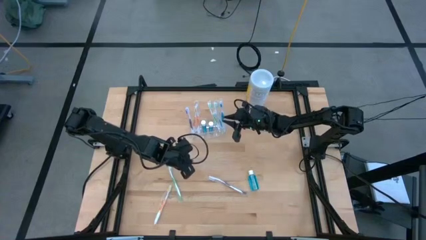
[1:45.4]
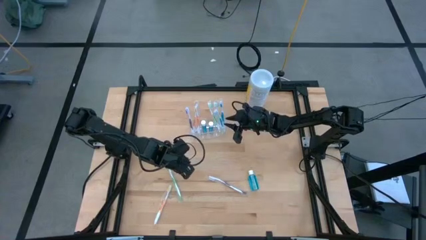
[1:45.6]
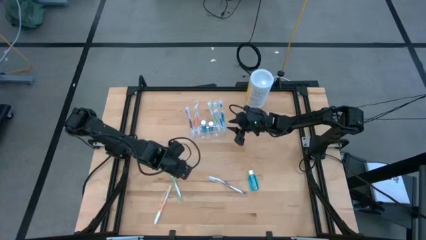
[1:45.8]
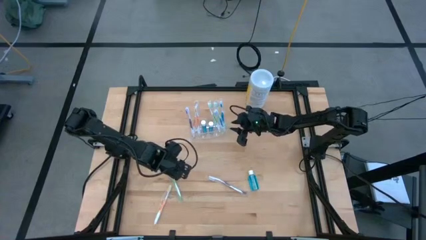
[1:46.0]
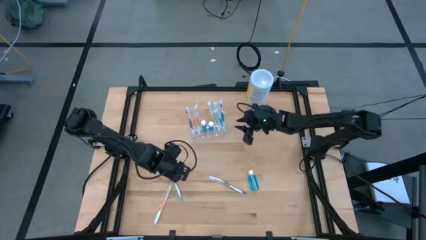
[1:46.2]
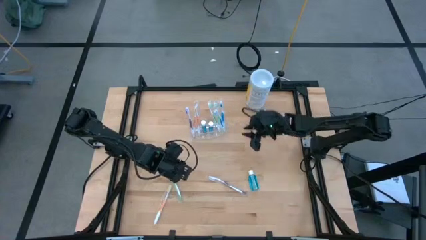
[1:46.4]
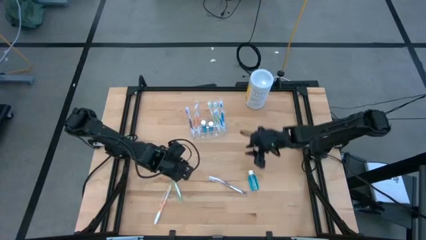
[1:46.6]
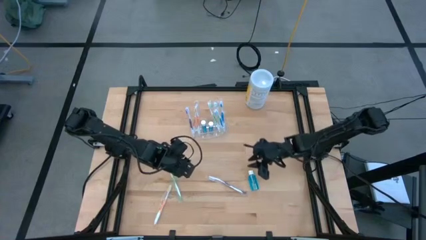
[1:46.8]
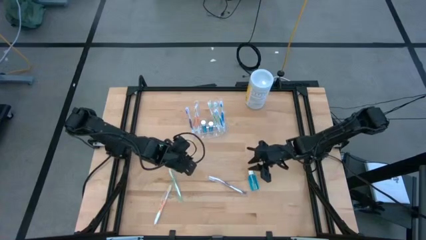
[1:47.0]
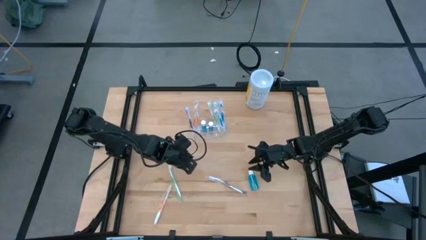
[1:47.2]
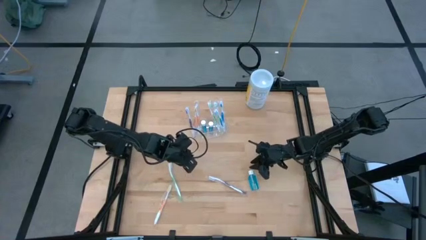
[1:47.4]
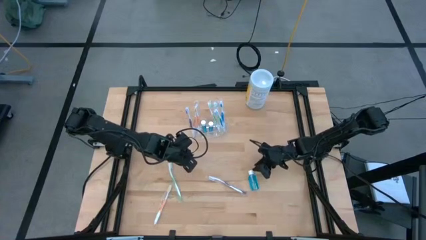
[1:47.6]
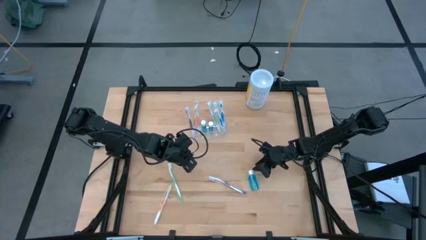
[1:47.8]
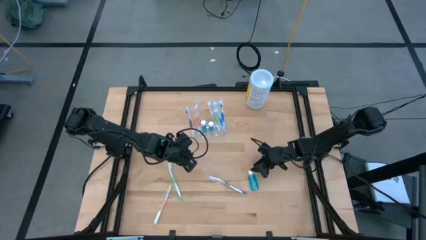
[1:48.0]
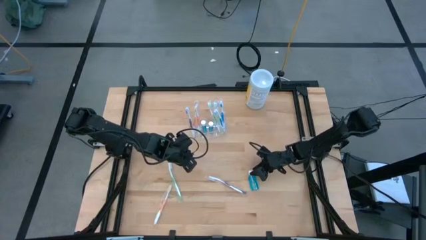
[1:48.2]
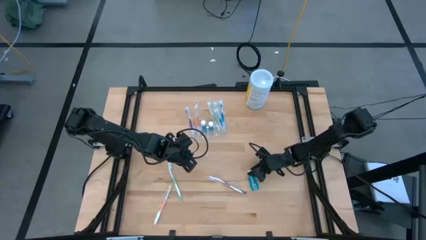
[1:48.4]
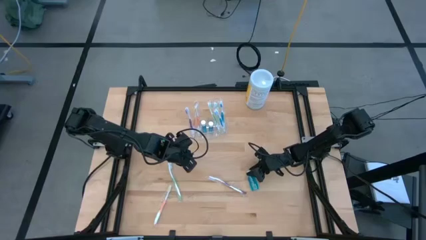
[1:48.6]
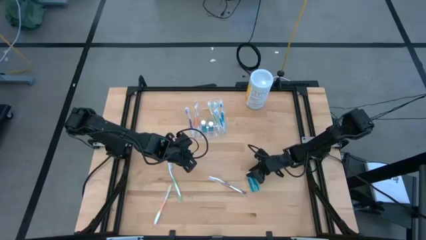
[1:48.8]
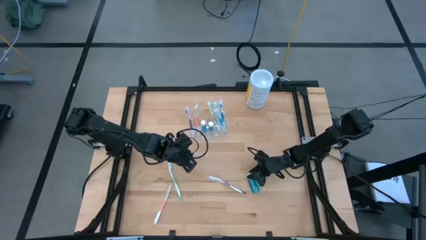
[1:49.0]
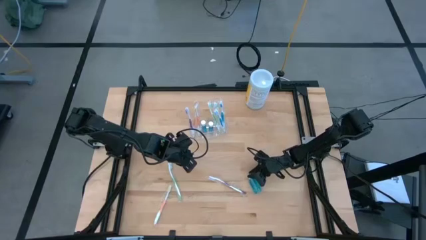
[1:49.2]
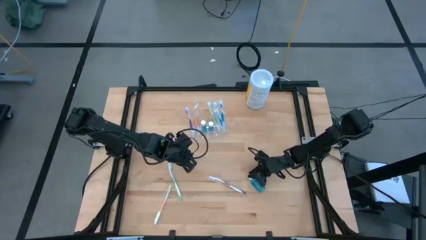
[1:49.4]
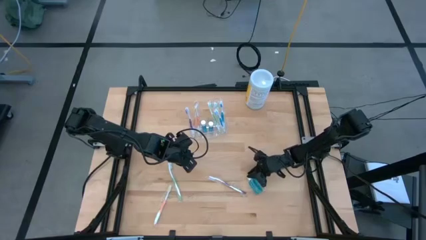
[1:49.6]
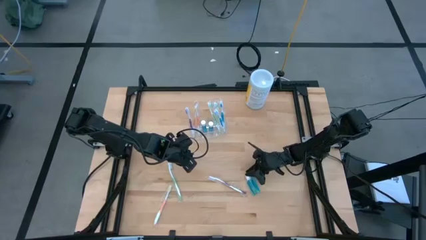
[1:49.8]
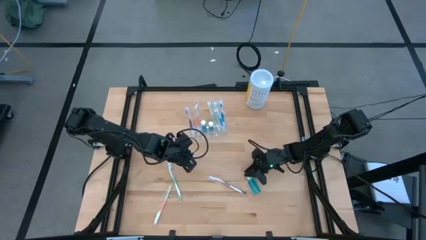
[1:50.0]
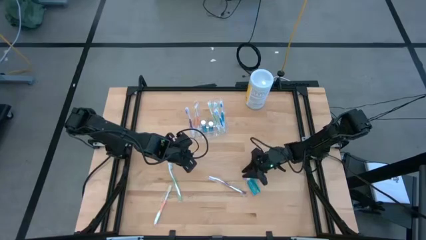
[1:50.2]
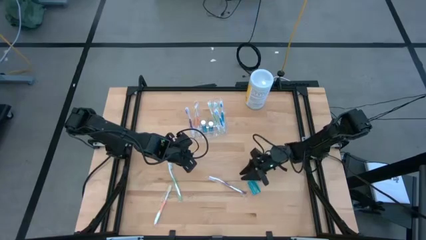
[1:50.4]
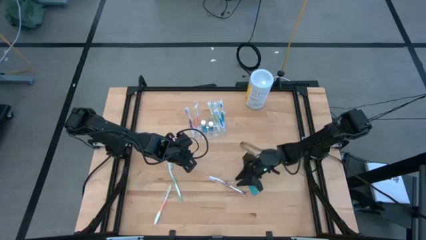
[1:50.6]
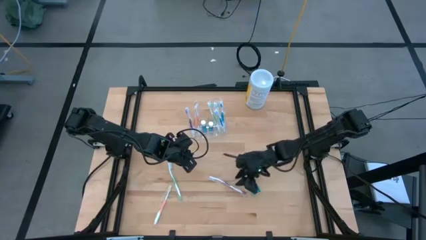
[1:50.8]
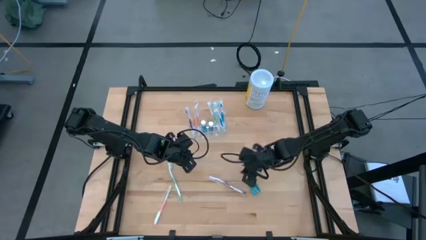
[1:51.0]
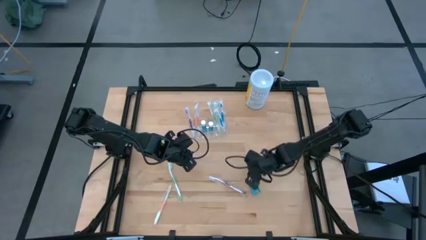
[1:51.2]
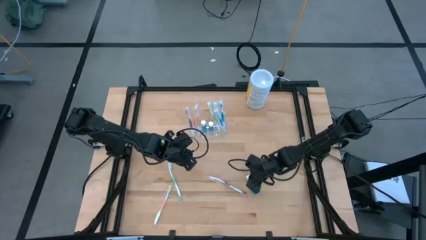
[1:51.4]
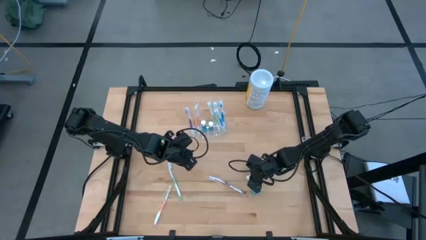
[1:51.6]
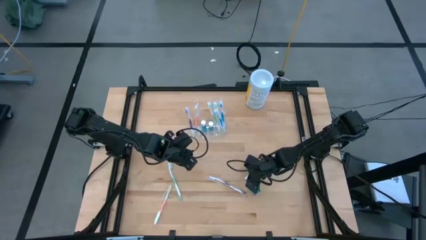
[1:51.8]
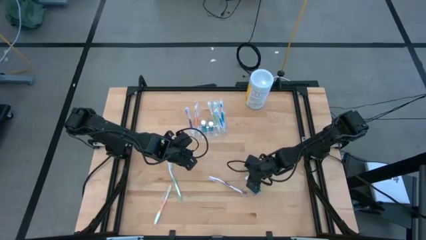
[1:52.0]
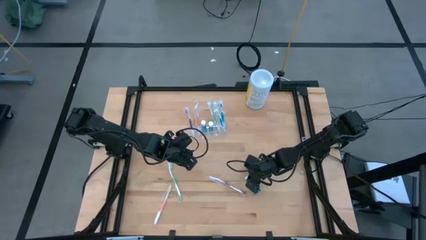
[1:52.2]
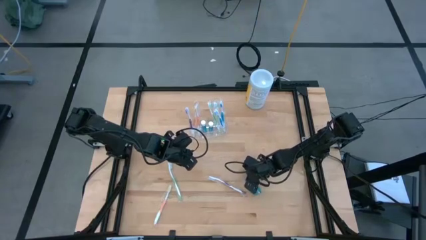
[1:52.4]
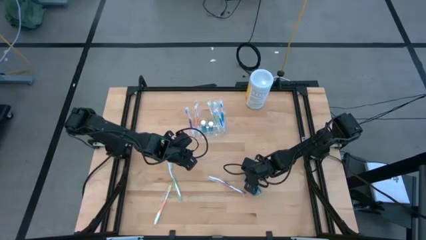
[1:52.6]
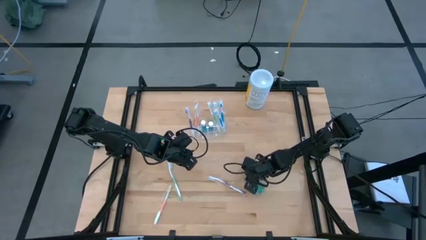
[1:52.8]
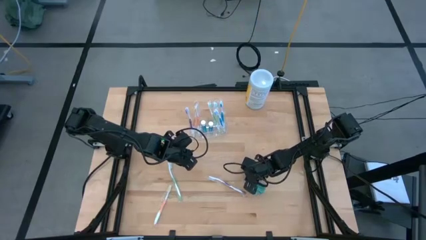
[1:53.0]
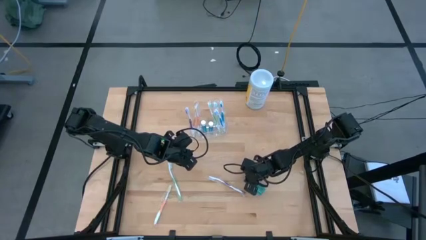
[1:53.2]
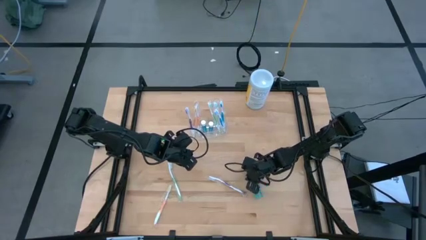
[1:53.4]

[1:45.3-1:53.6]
Task: Pick & Place toothbrushing station
Put the mouthwash into the transparent organizer

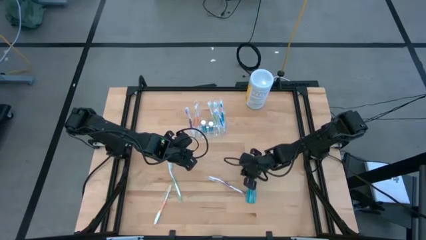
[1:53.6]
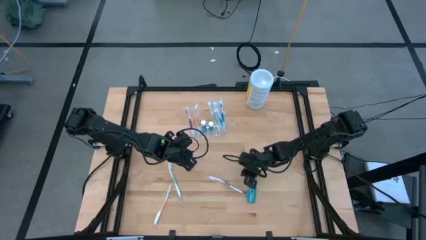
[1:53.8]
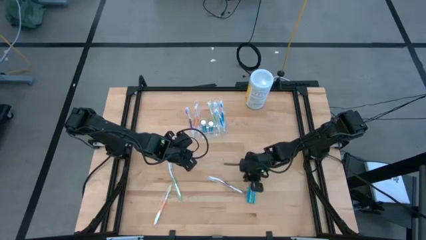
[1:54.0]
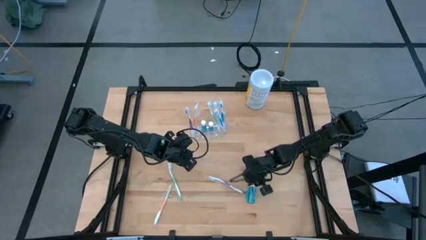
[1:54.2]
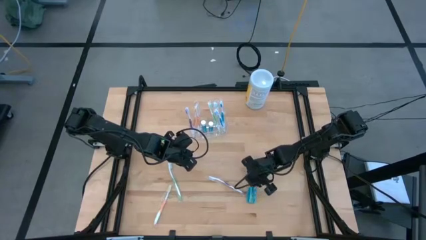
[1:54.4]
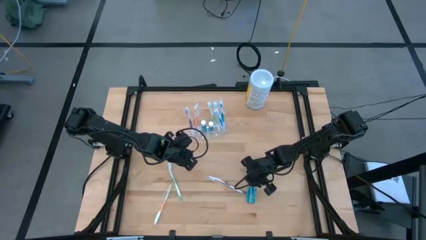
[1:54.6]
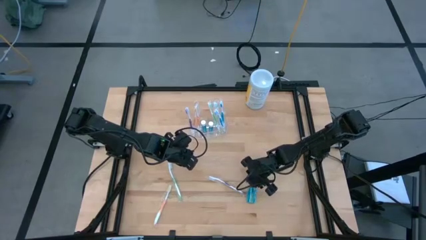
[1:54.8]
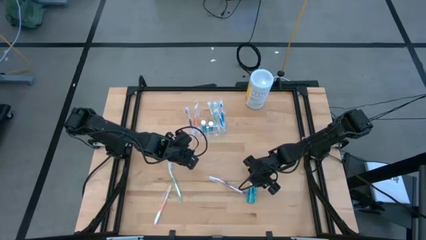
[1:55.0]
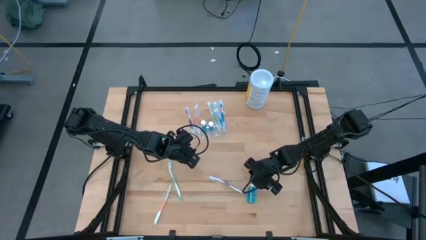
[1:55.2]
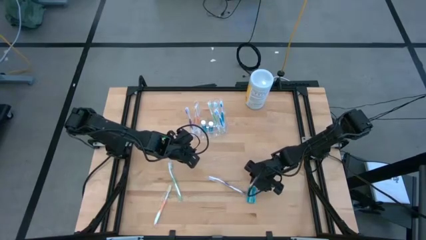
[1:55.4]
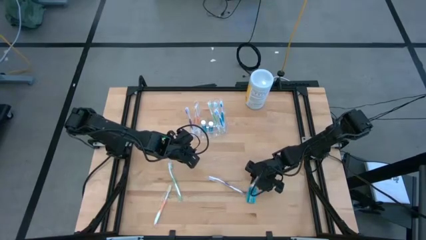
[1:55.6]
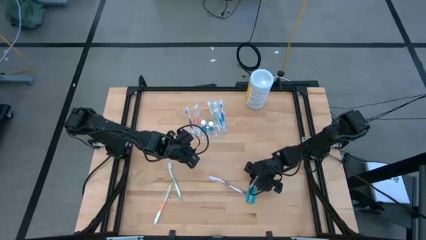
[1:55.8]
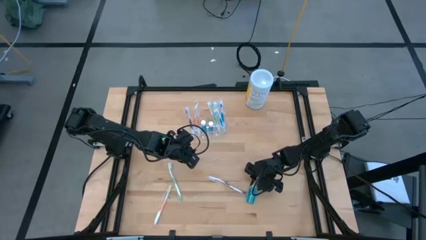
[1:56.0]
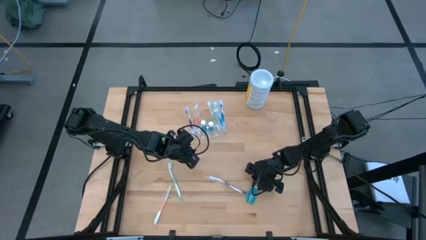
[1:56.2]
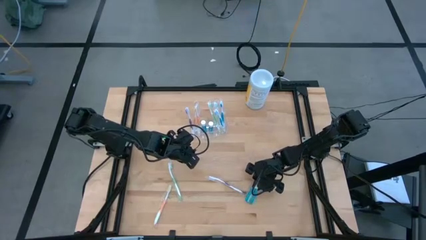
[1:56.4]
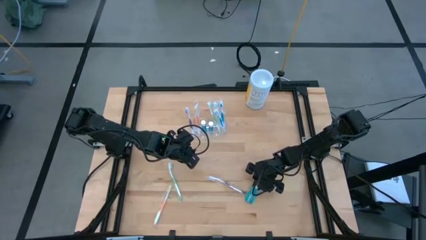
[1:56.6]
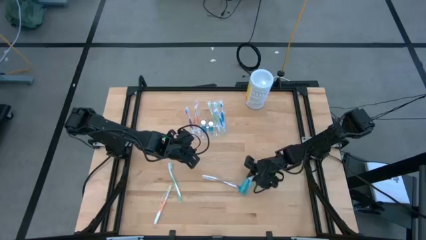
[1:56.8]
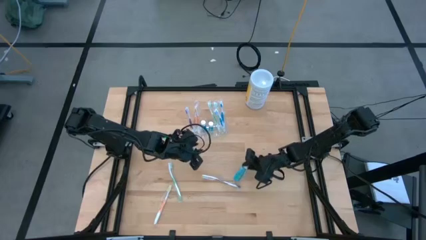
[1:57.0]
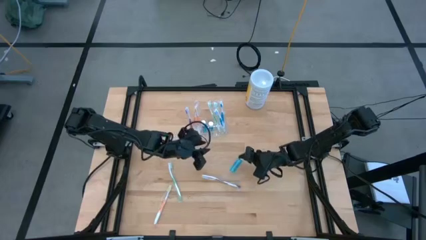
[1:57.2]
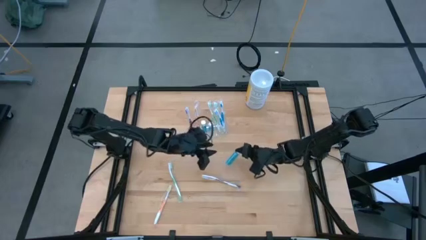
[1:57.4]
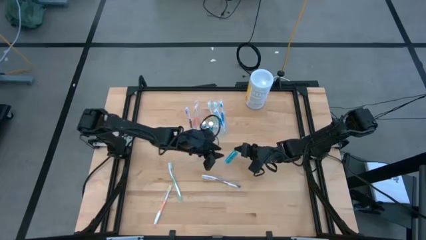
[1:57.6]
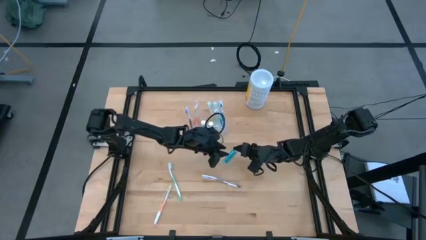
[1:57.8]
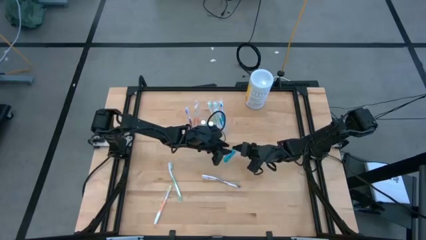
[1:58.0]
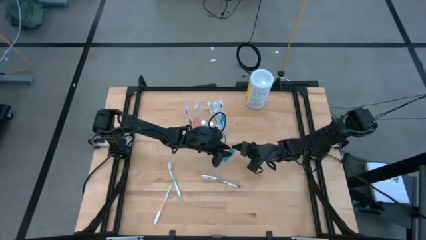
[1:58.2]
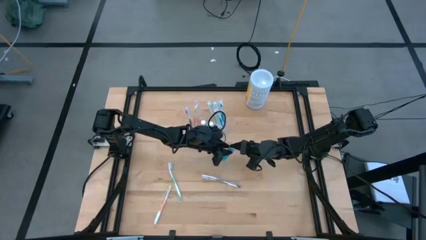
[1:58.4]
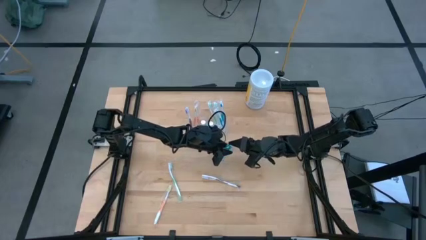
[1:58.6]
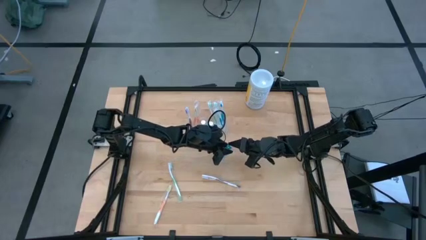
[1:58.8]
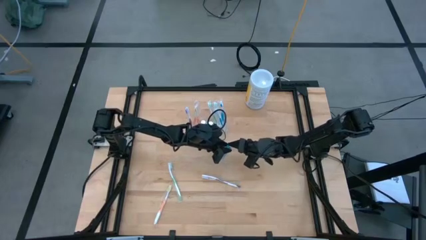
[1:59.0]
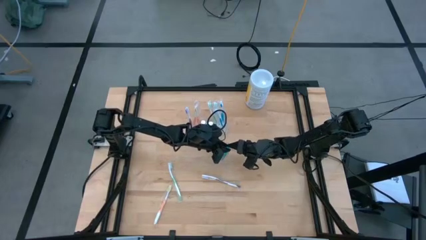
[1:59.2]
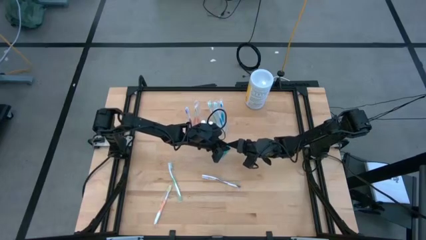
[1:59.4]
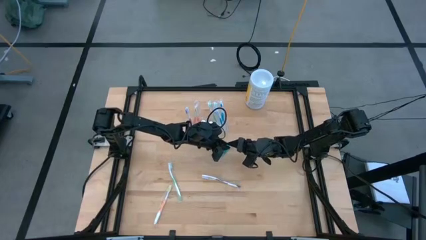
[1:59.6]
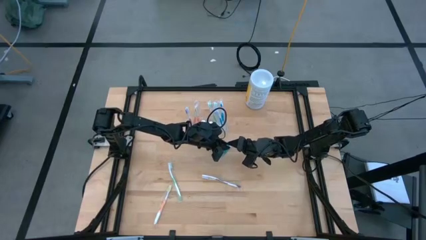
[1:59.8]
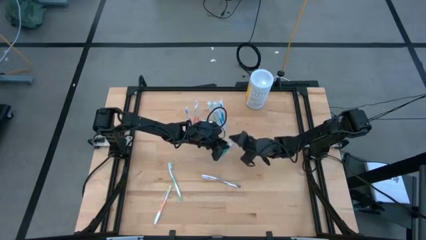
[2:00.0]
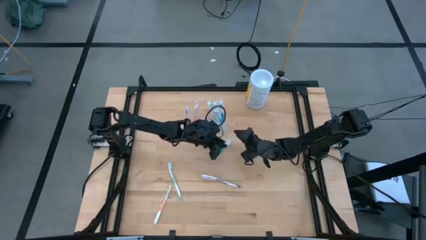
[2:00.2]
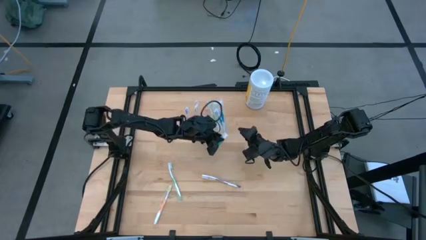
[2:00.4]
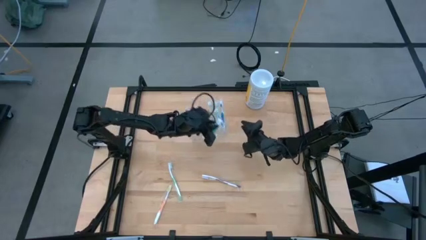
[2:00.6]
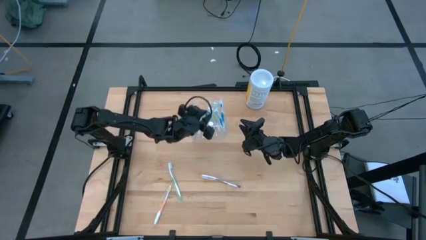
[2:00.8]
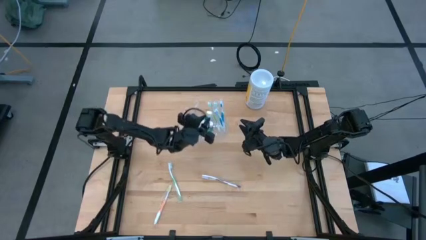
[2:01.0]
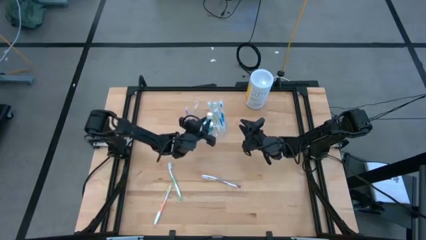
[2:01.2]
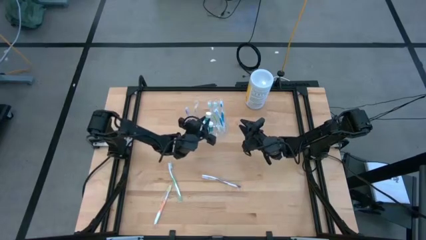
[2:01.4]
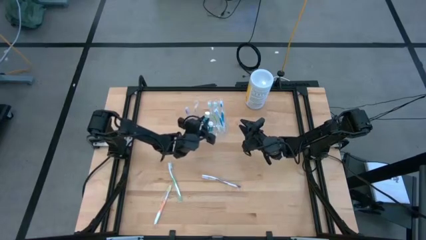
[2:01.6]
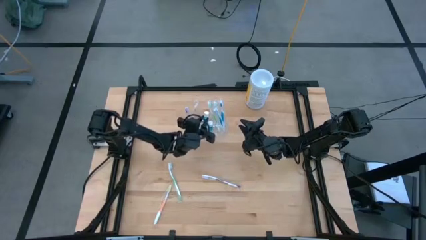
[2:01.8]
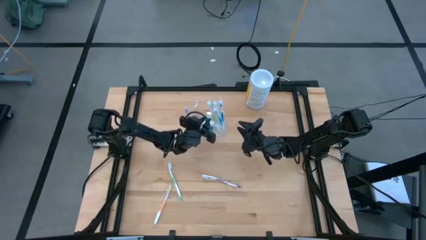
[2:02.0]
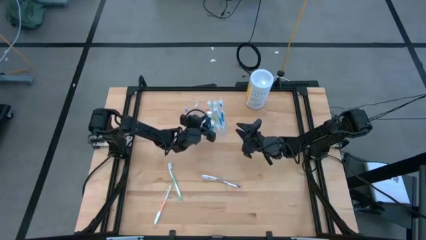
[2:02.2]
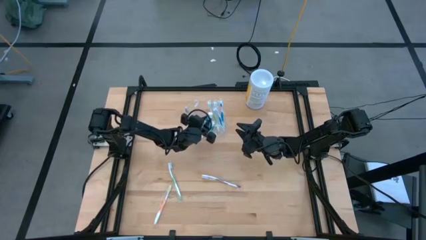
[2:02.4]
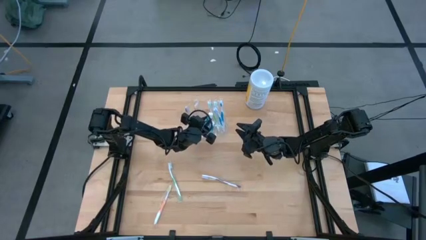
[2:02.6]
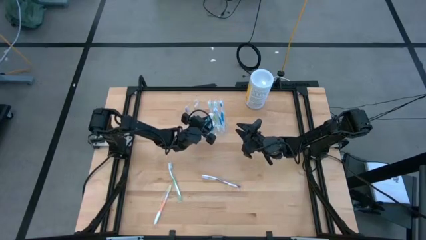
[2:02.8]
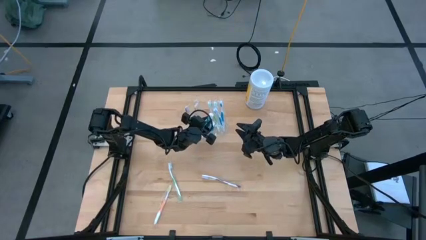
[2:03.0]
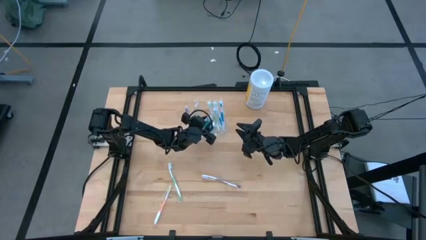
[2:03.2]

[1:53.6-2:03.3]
Put the mouthwash into the transparent organizer
